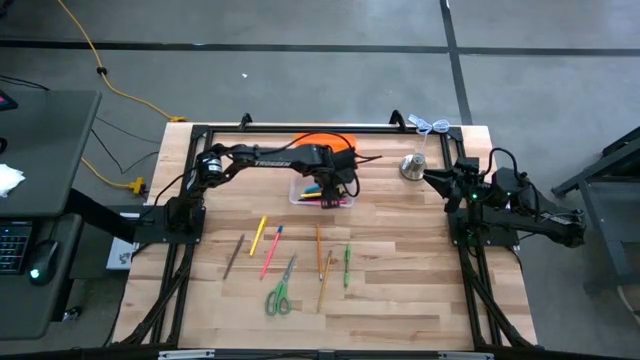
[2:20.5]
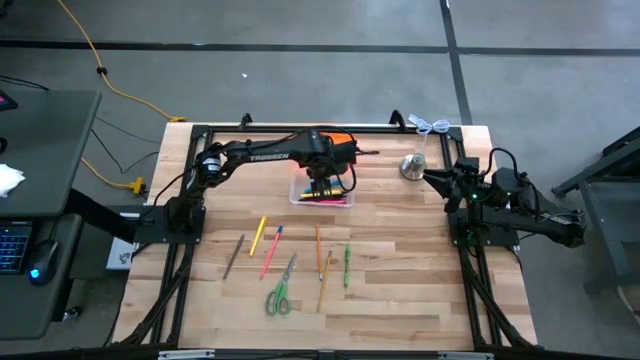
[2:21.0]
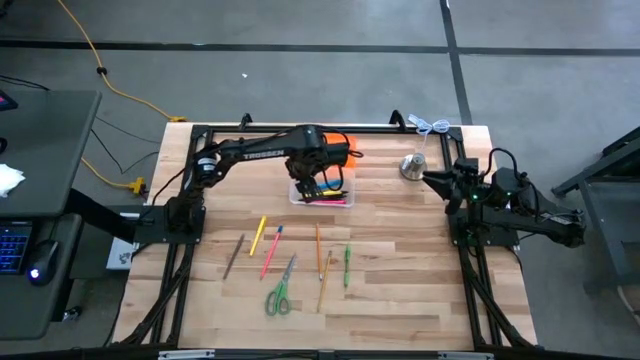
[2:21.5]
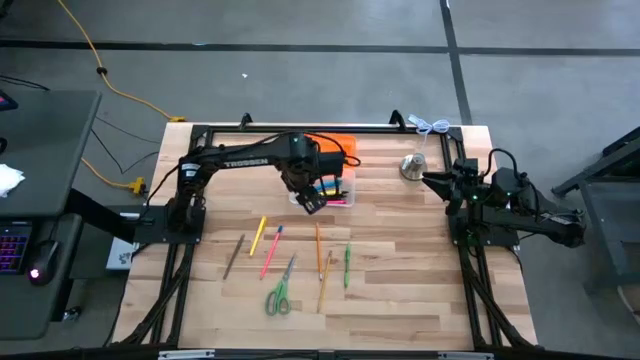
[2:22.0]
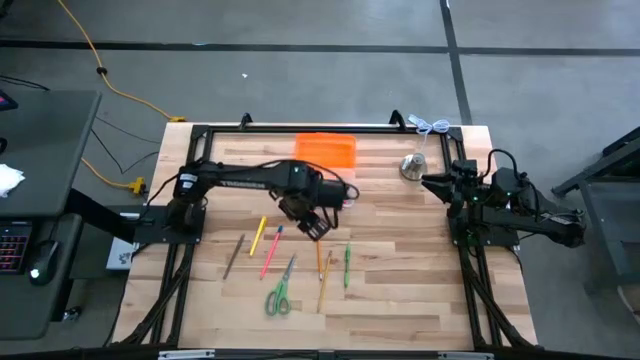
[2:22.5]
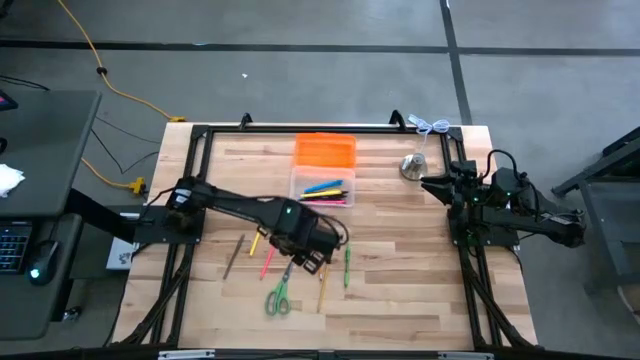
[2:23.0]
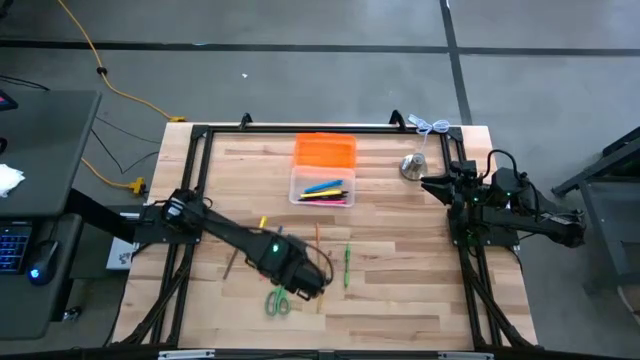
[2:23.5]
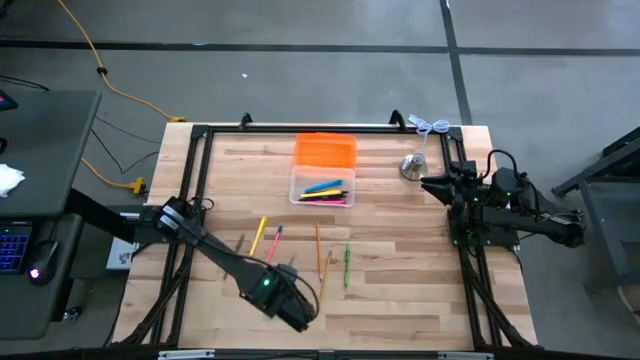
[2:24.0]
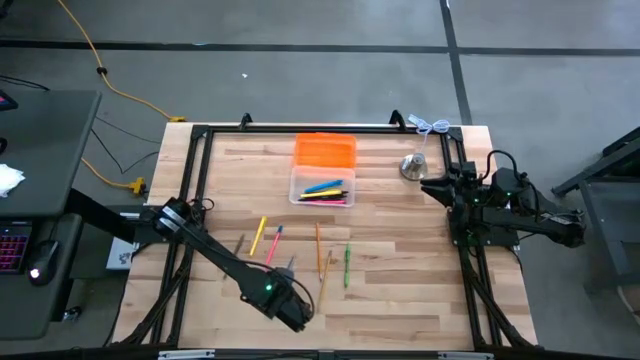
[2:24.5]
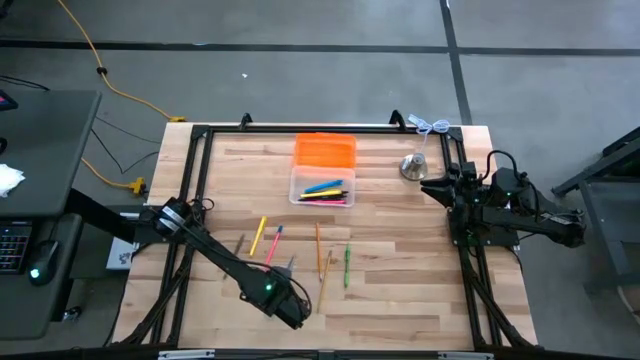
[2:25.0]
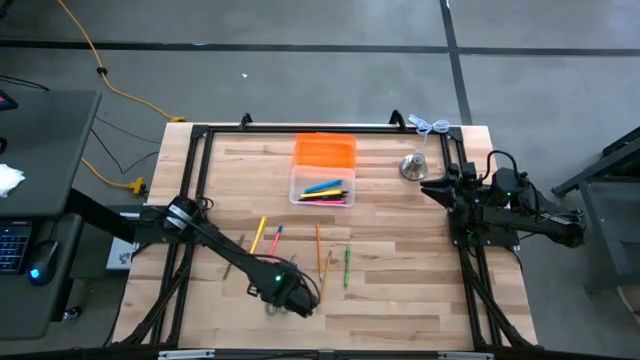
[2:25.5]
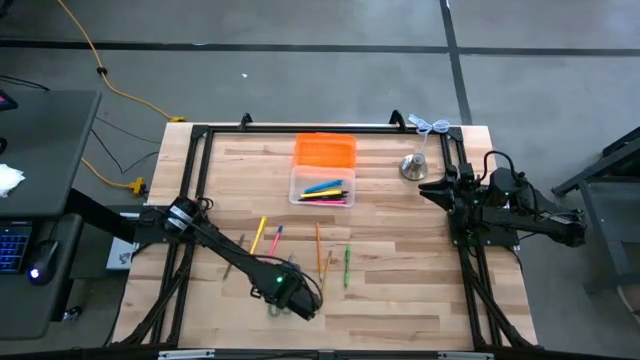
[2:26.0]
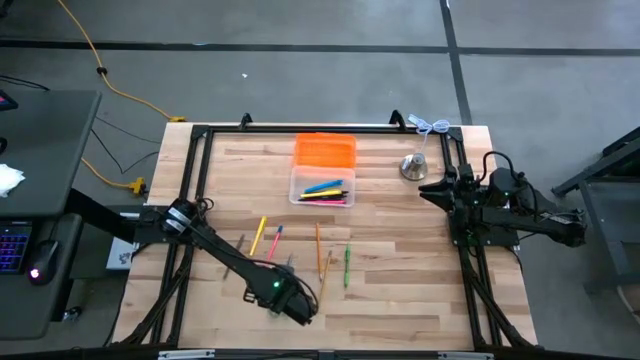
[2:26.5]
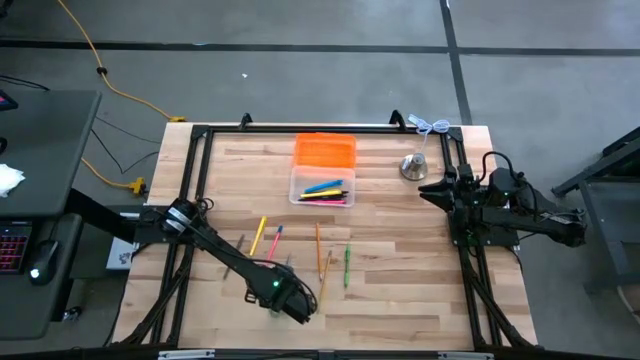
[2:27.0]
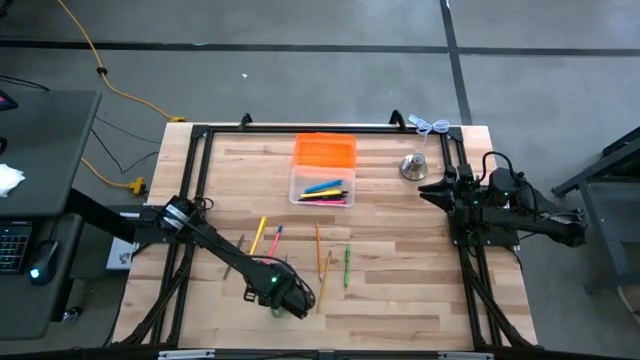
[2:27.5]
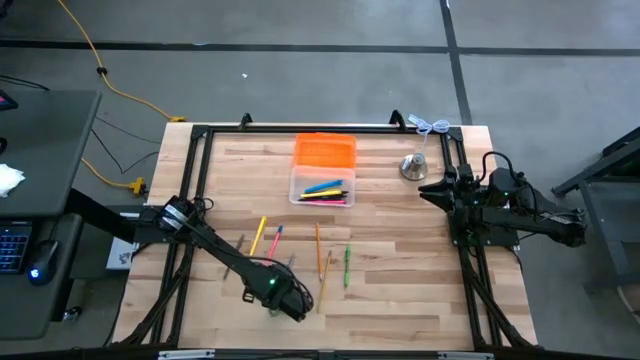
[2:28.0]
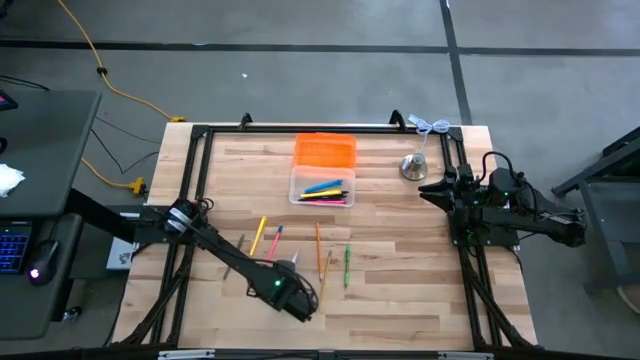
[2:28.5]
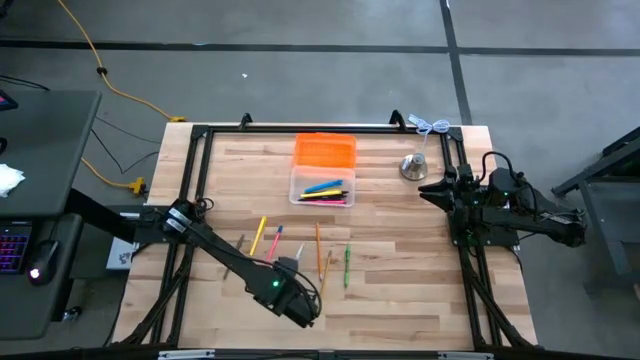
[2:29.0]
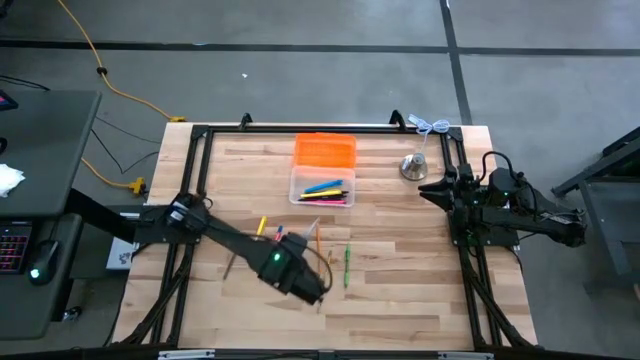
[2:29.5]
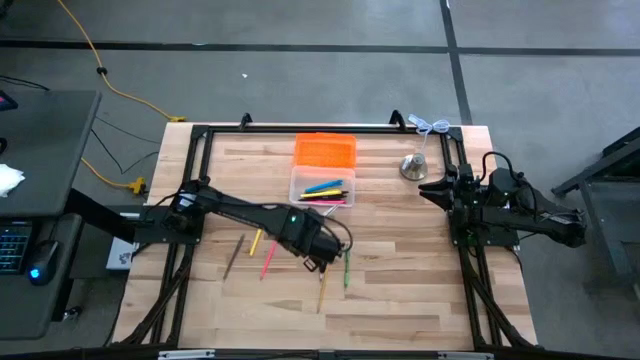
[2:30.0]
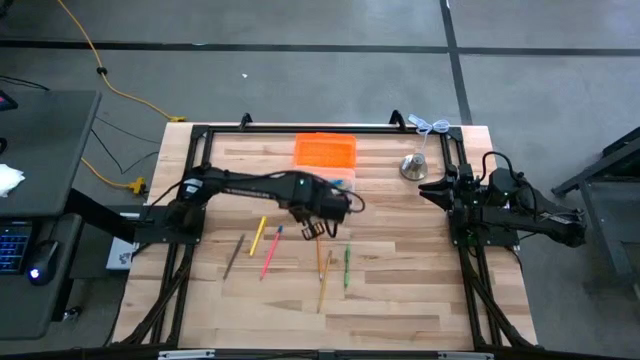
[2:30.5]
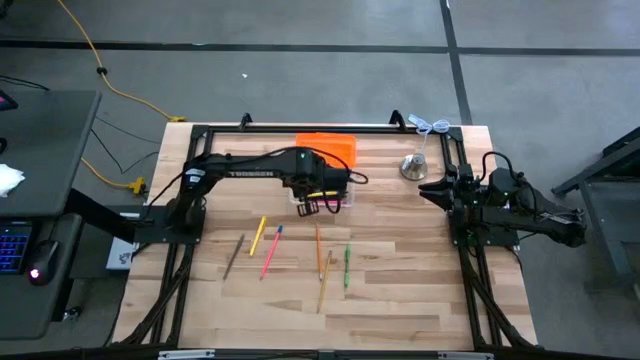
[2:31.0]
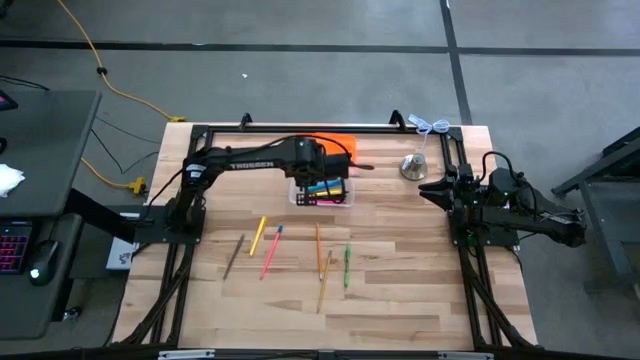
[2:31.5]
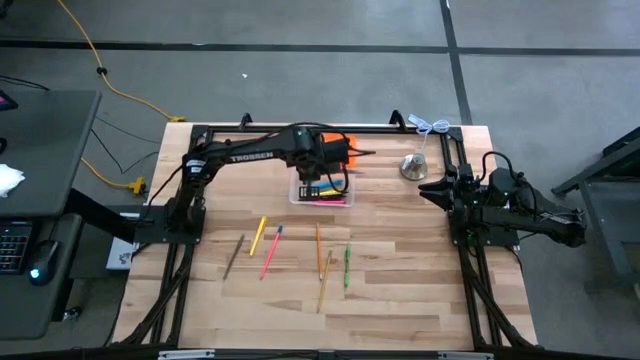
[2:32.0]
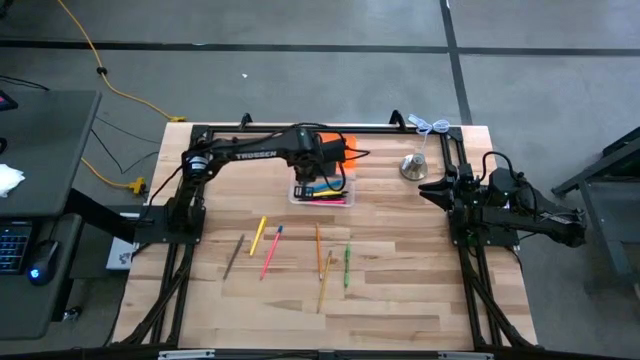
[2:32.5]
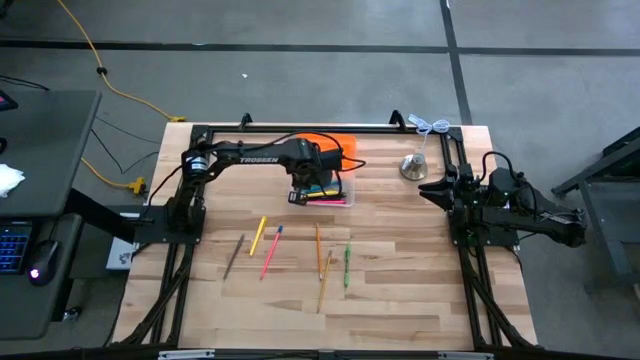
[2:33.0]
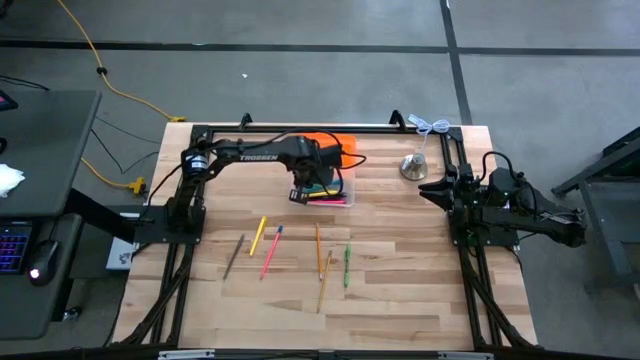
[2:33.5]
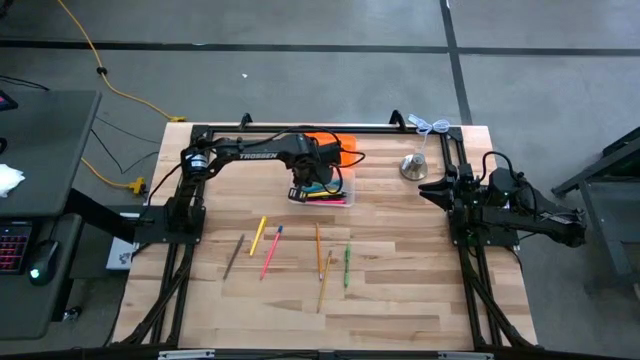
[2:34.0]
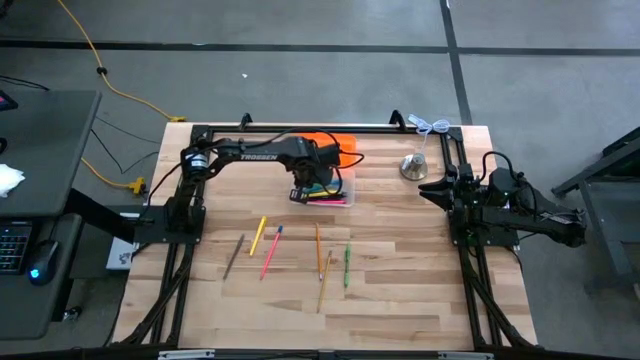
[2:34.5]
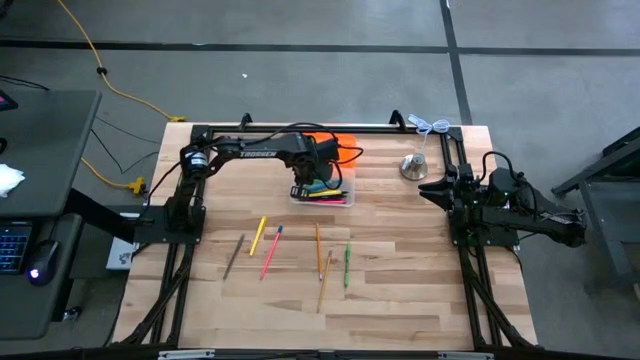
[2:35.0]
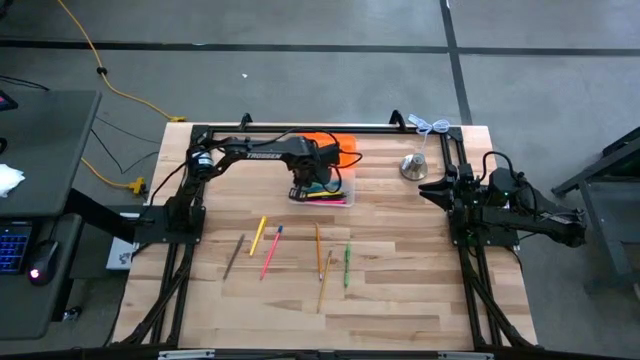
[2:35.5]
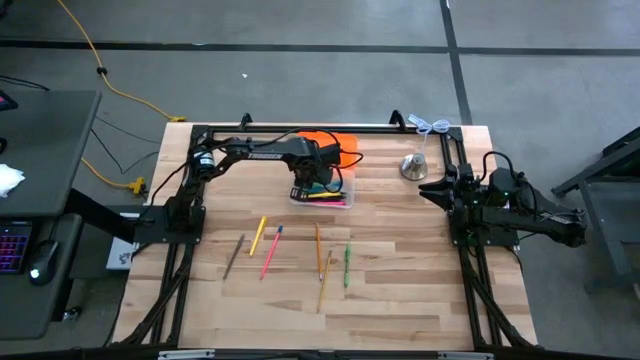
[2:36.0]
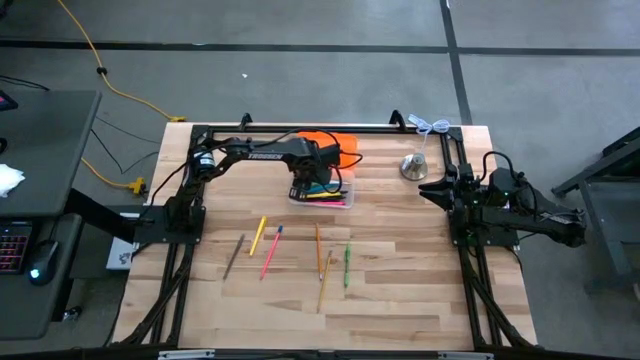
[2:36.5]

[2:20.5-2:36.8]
Task: Pick & place school supplies into a supply box
Put the green scissors into the transparent supply box

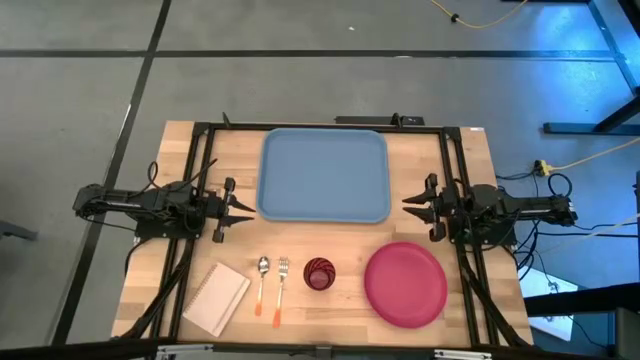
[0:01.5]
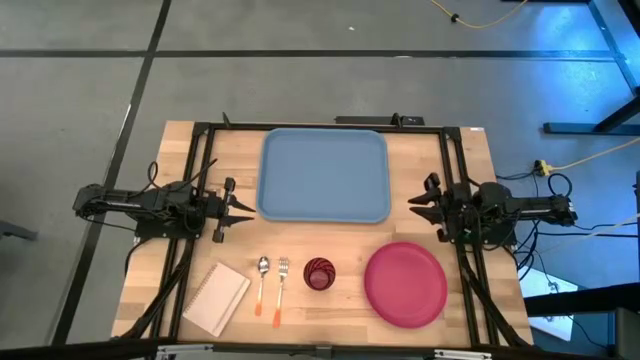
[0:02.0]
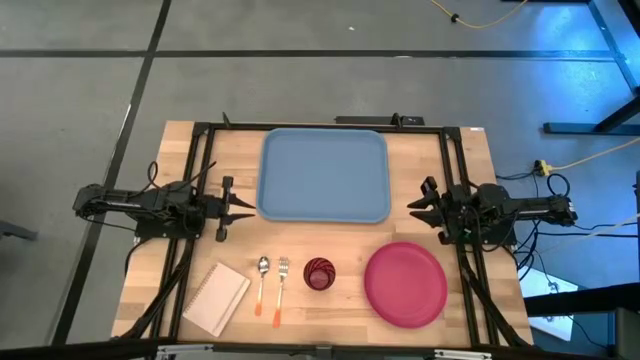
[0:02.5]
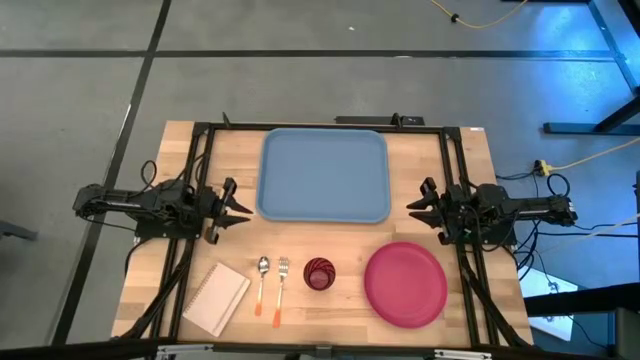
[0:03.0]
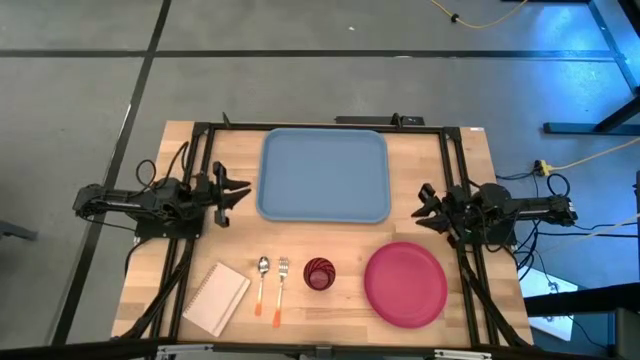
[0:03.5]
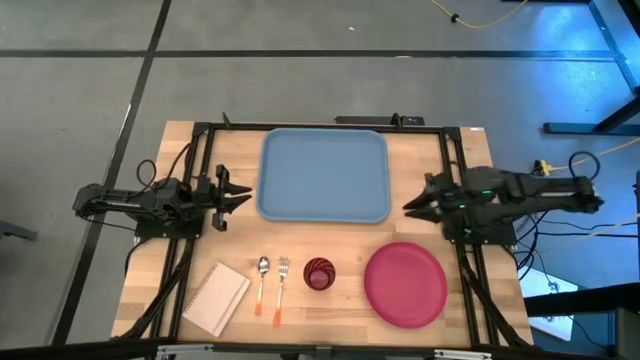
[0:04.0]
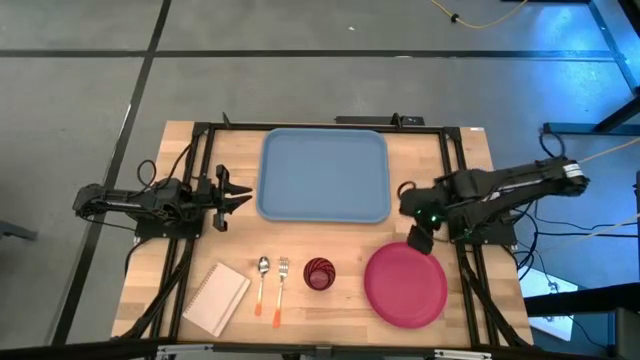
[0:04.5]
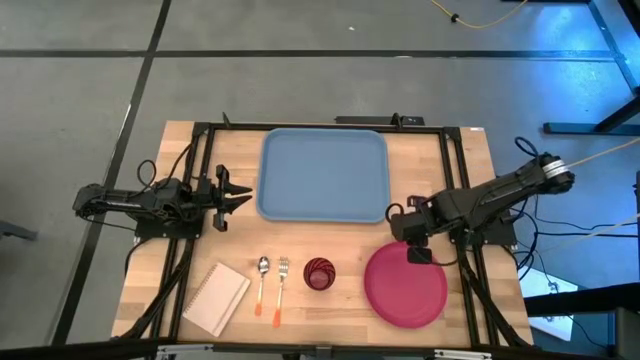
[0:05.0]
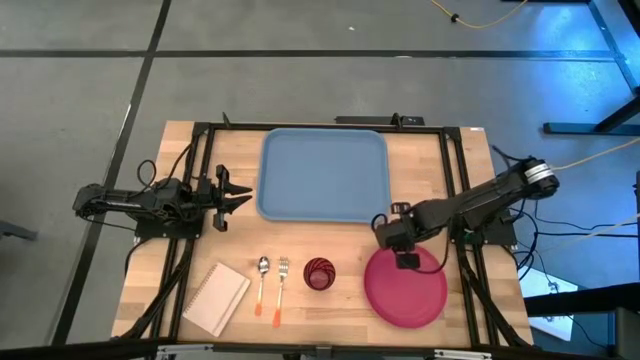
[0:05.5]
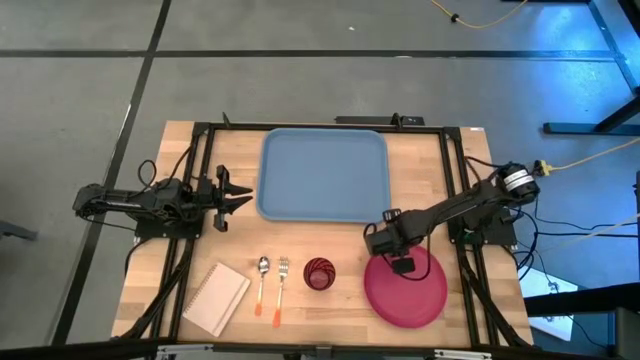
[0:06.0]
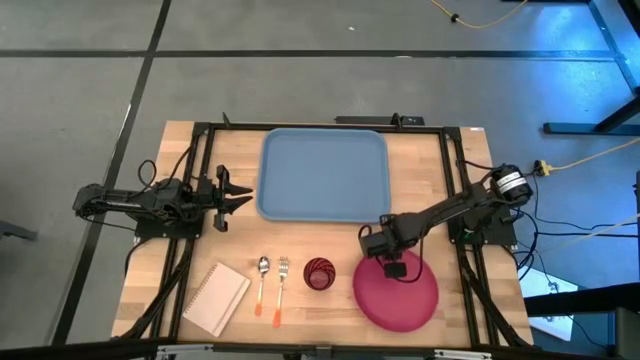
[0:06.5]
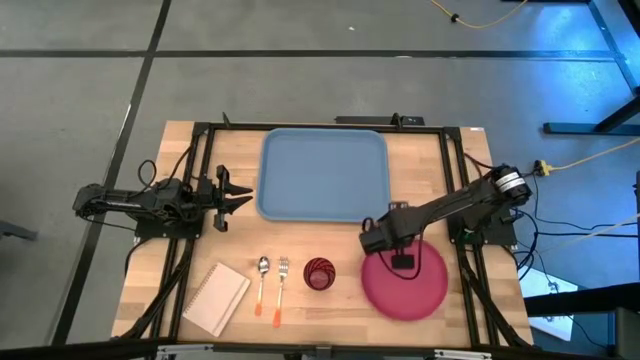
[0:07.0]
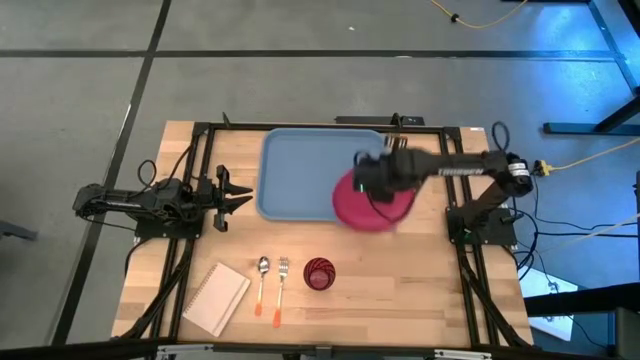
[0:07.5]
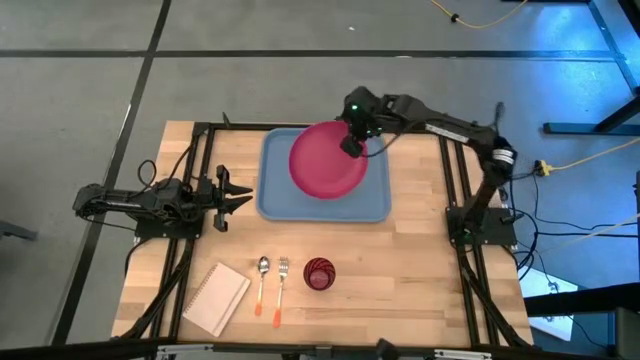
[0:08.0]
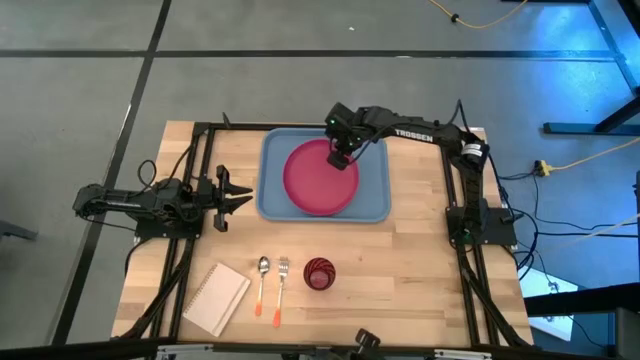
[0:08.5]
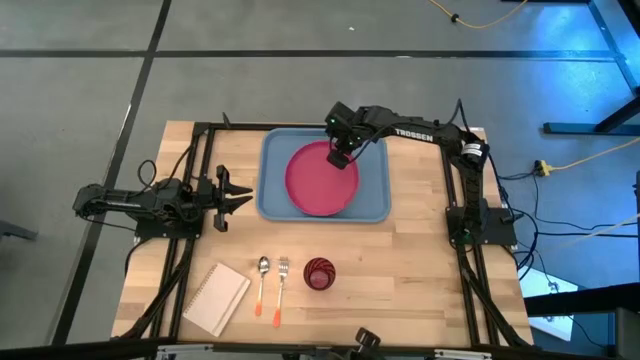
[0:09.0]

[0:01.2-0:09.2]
Task: Pick and place plate/cup/fork/spoon on tray
Put the pink plate on the bottom middle of the blue serving tray
